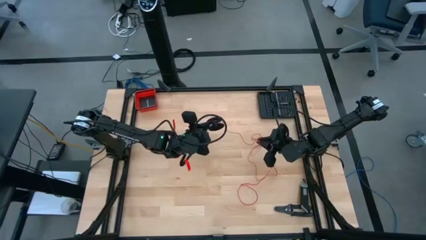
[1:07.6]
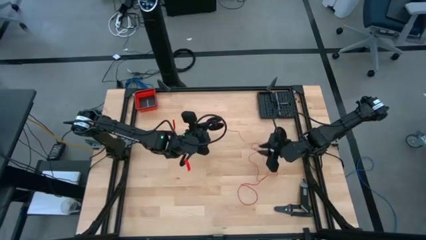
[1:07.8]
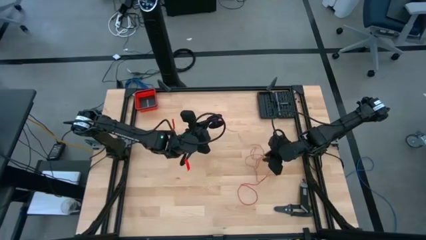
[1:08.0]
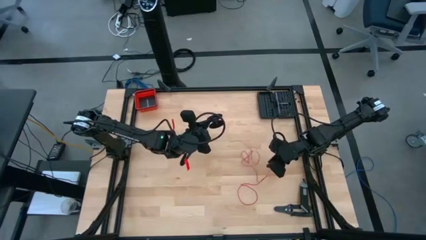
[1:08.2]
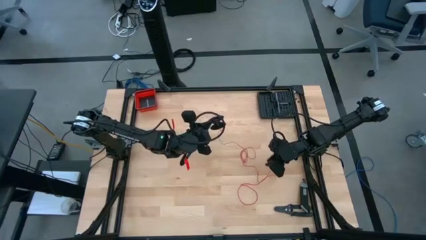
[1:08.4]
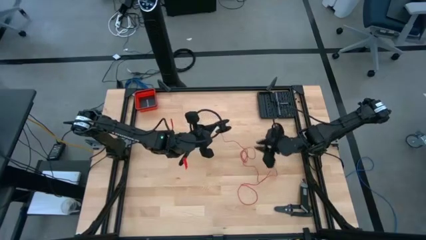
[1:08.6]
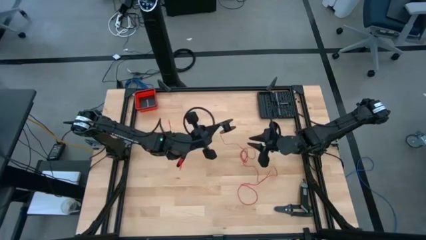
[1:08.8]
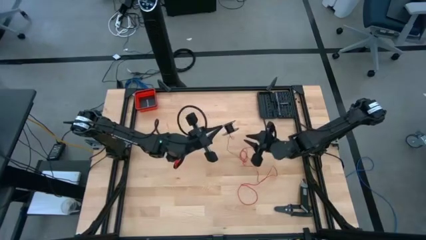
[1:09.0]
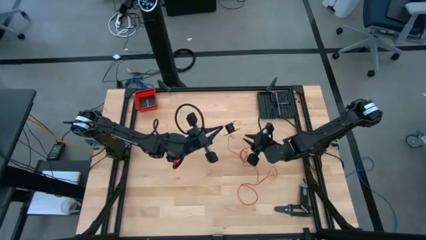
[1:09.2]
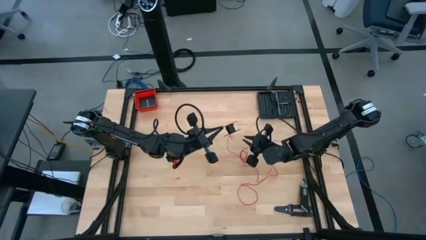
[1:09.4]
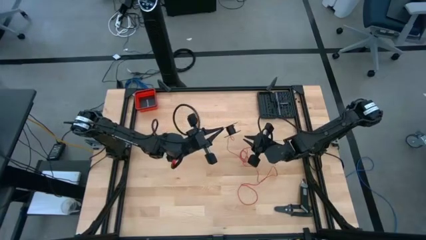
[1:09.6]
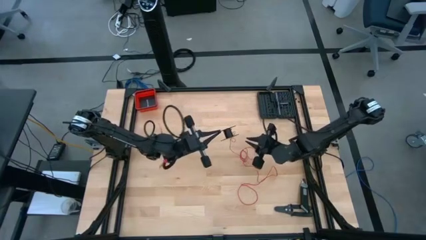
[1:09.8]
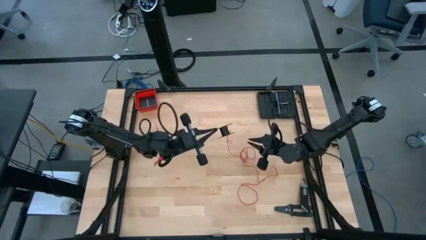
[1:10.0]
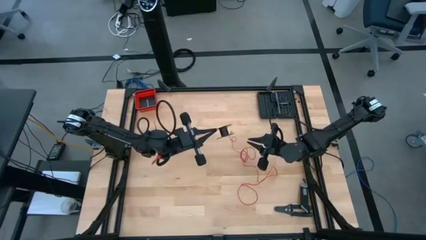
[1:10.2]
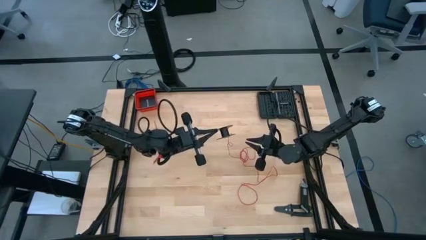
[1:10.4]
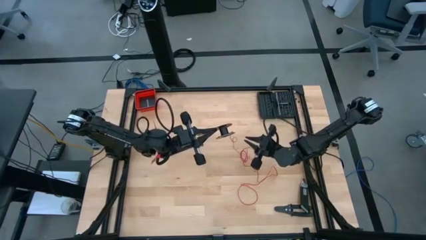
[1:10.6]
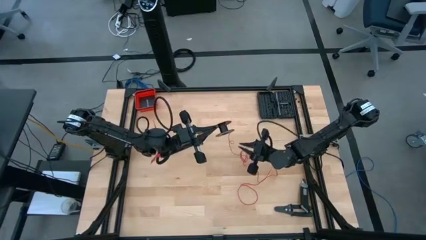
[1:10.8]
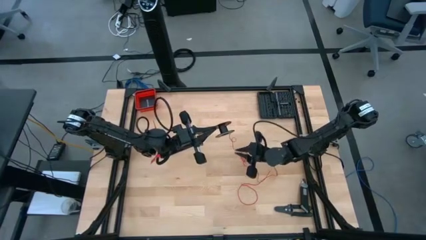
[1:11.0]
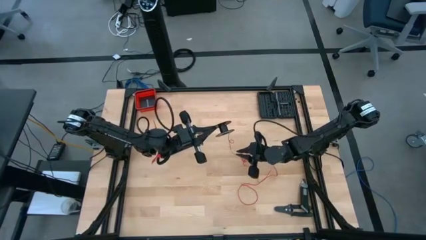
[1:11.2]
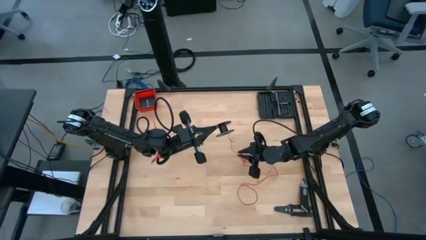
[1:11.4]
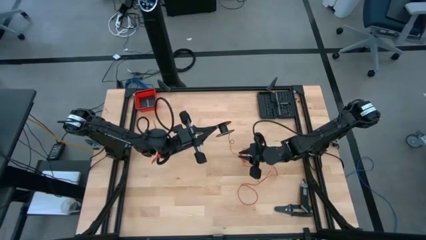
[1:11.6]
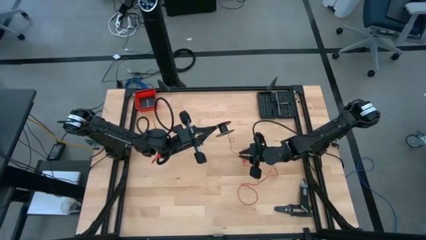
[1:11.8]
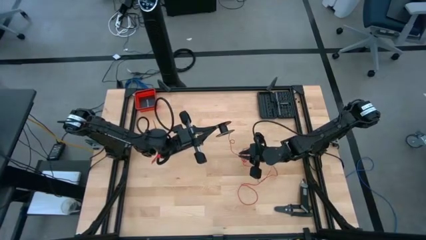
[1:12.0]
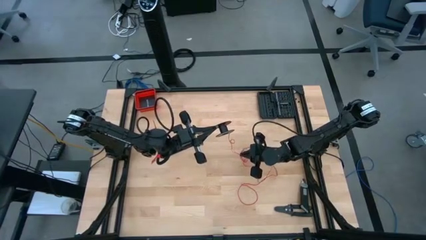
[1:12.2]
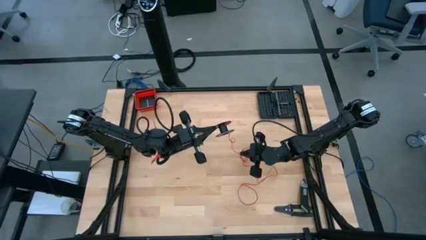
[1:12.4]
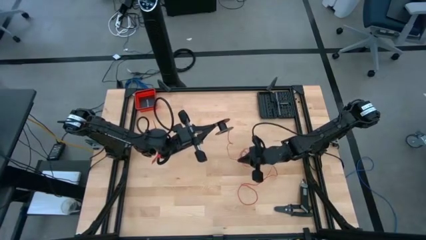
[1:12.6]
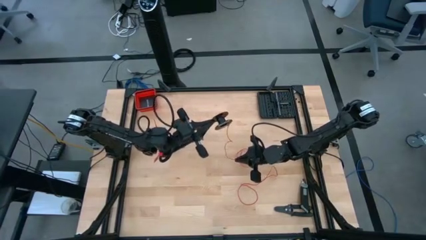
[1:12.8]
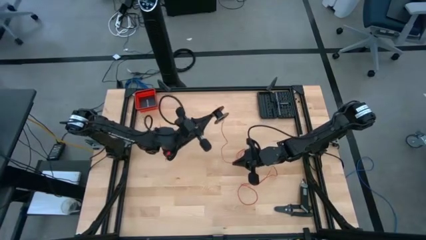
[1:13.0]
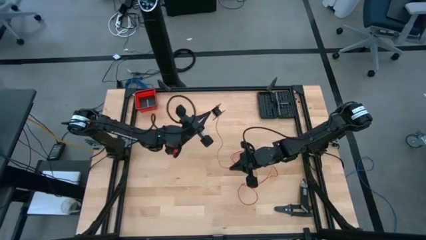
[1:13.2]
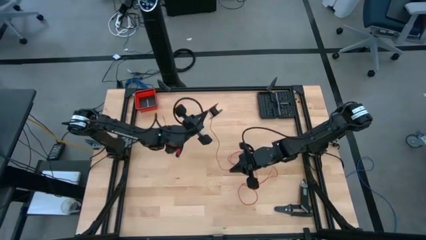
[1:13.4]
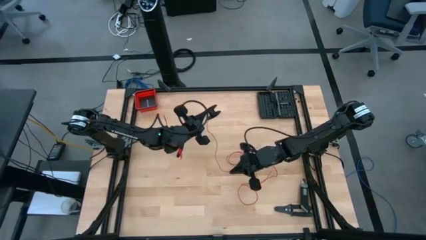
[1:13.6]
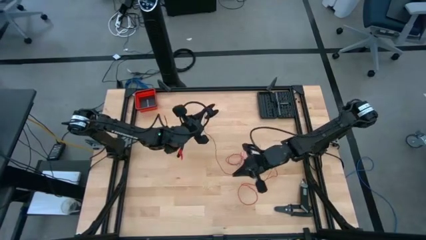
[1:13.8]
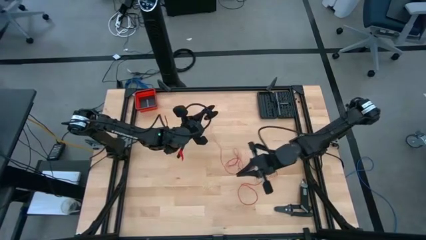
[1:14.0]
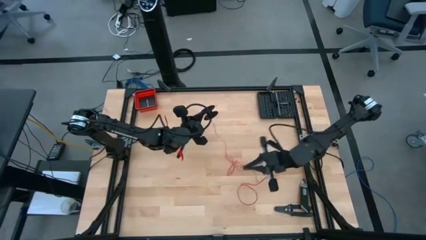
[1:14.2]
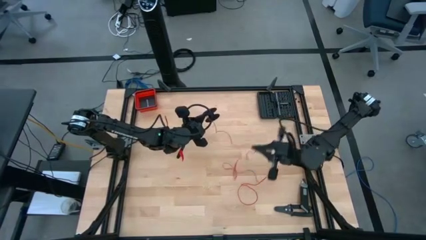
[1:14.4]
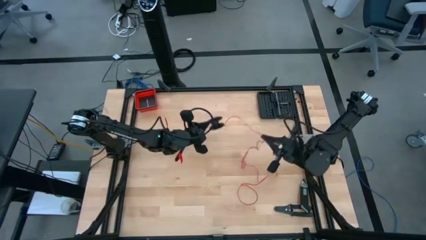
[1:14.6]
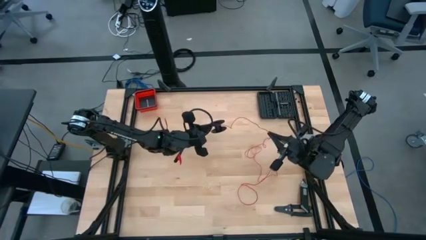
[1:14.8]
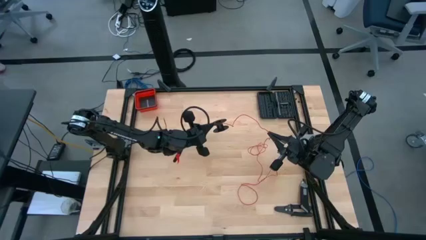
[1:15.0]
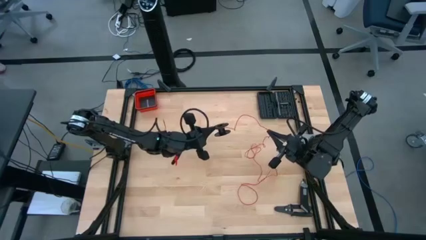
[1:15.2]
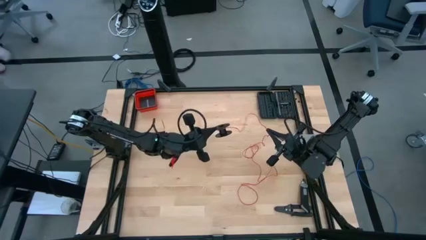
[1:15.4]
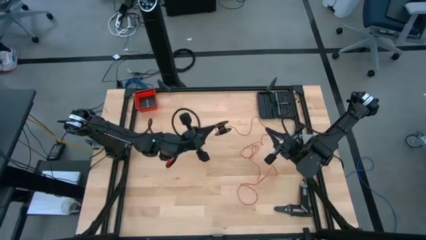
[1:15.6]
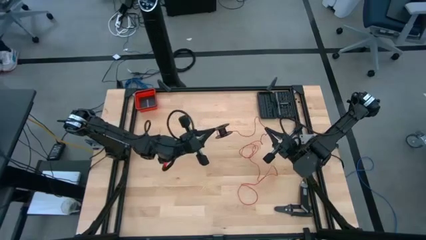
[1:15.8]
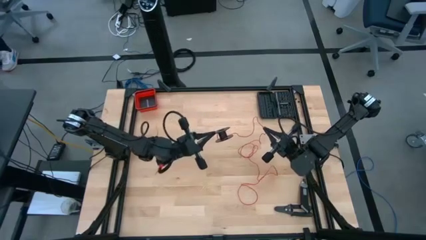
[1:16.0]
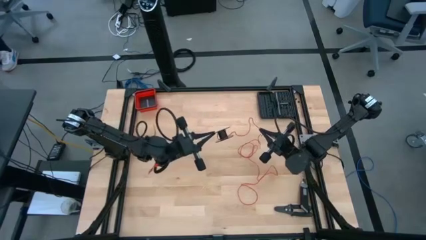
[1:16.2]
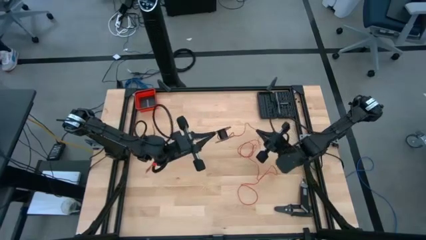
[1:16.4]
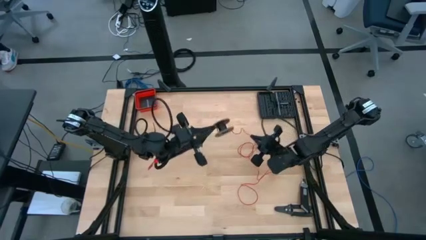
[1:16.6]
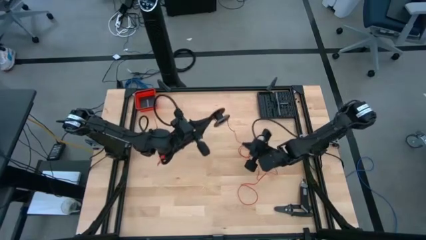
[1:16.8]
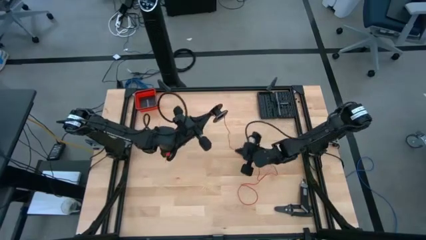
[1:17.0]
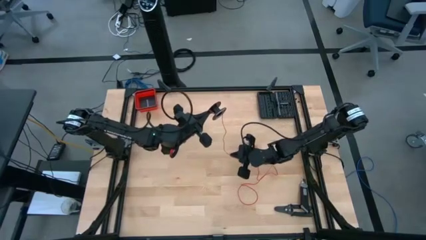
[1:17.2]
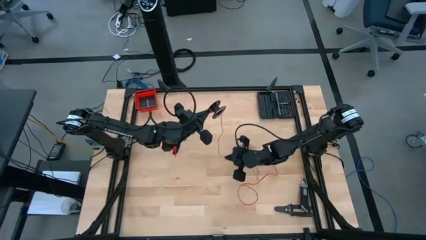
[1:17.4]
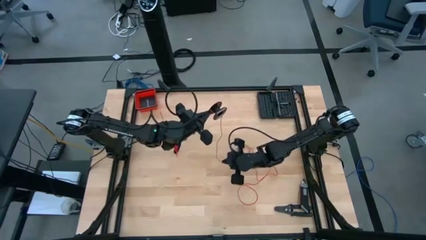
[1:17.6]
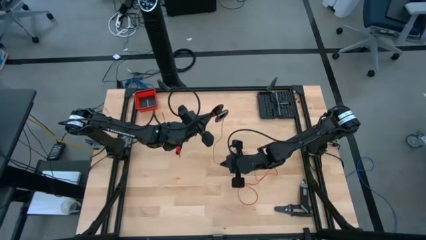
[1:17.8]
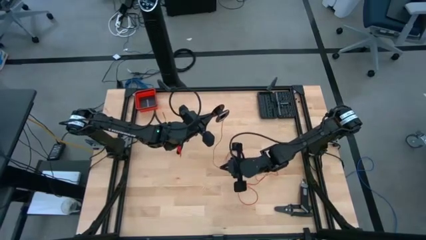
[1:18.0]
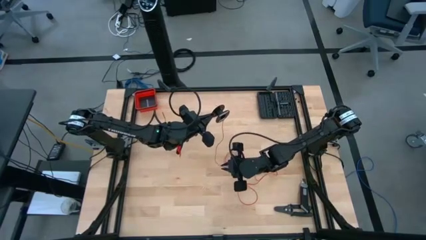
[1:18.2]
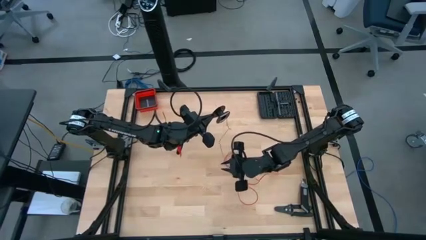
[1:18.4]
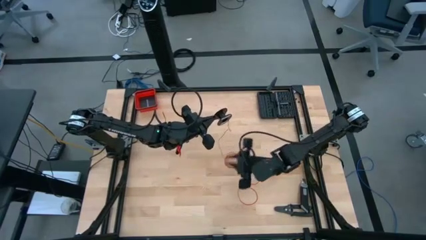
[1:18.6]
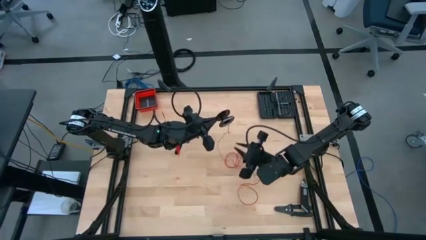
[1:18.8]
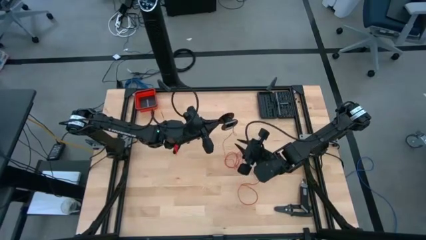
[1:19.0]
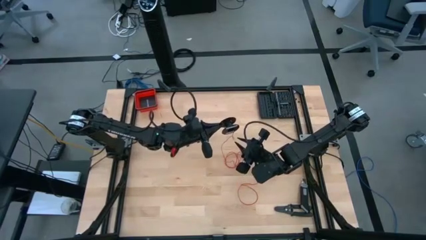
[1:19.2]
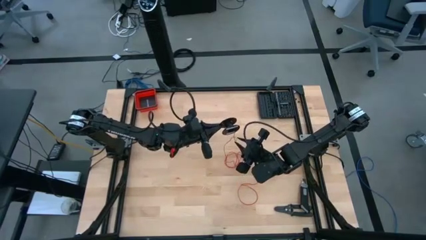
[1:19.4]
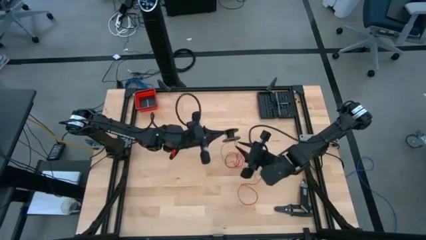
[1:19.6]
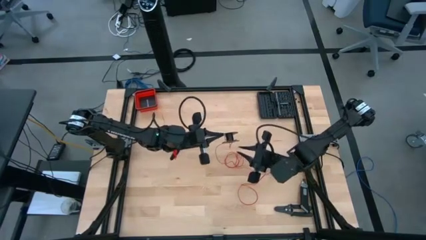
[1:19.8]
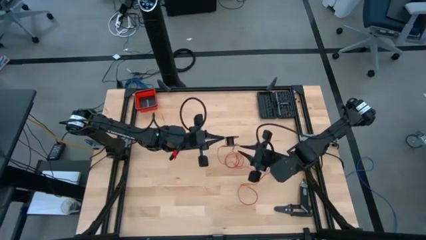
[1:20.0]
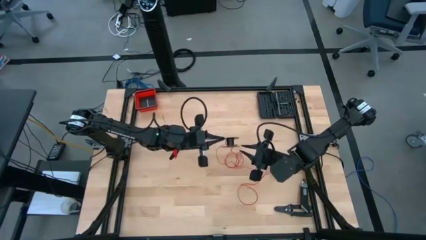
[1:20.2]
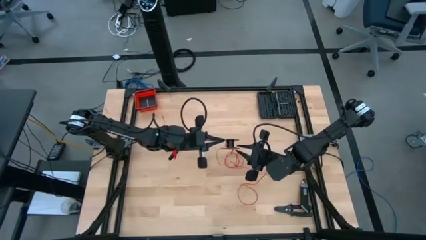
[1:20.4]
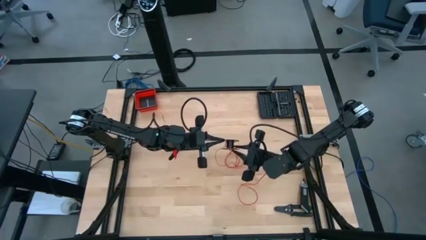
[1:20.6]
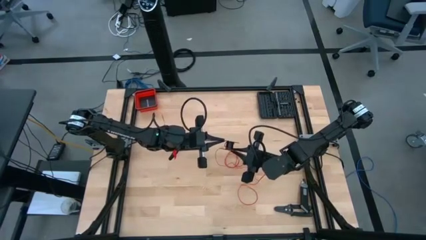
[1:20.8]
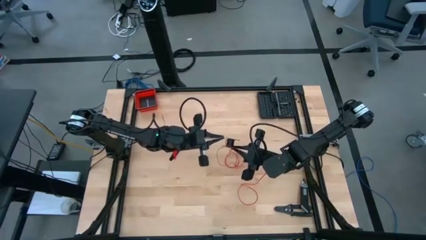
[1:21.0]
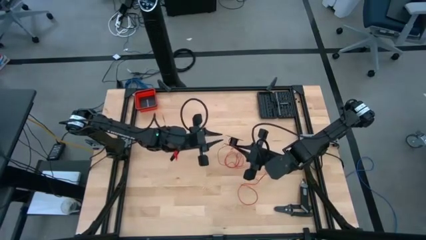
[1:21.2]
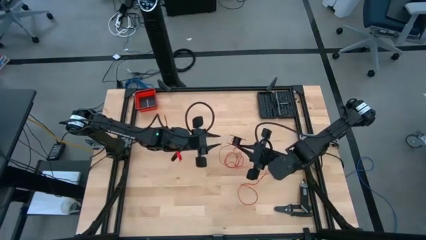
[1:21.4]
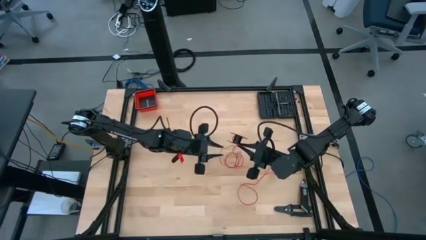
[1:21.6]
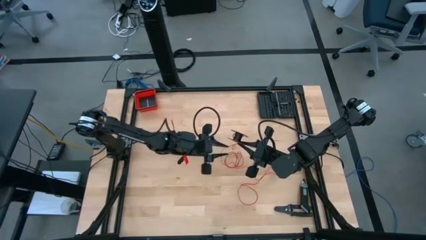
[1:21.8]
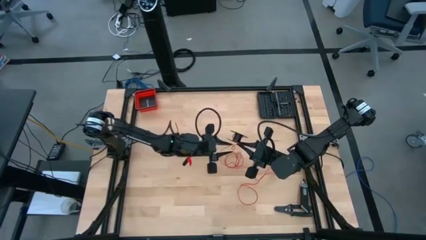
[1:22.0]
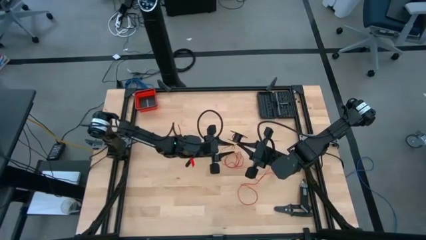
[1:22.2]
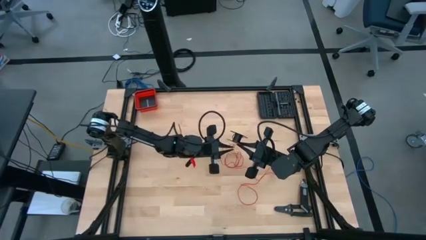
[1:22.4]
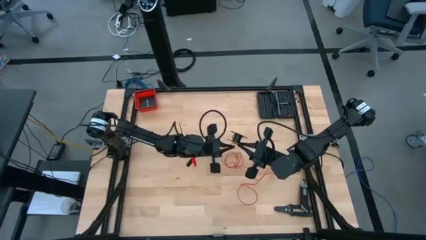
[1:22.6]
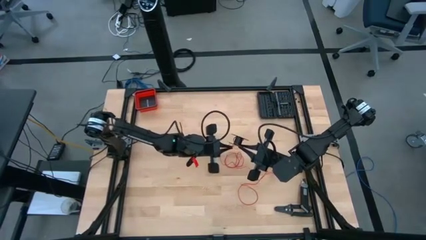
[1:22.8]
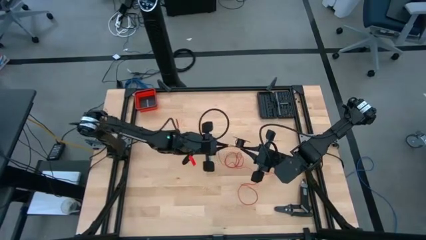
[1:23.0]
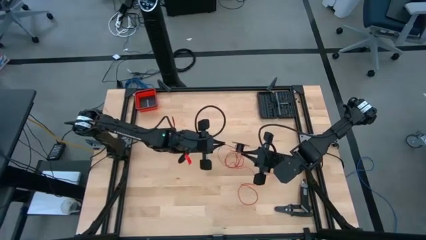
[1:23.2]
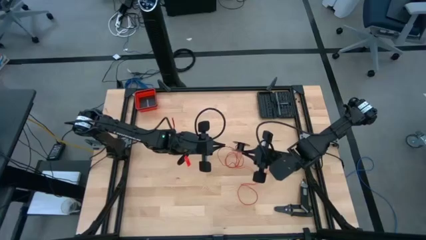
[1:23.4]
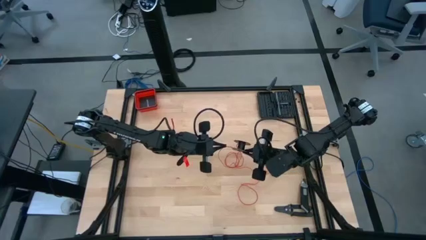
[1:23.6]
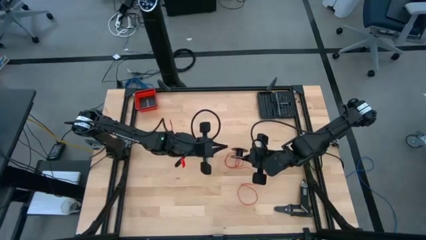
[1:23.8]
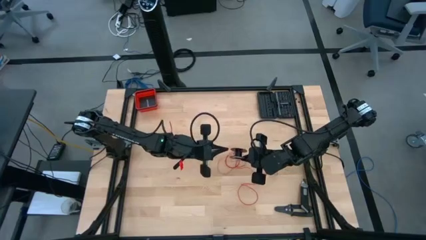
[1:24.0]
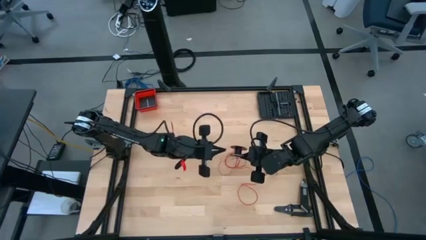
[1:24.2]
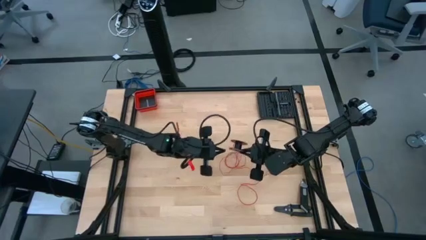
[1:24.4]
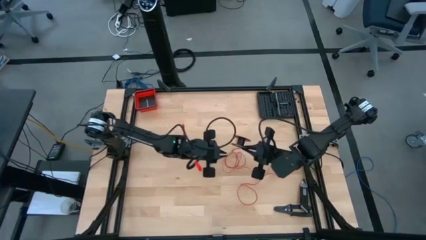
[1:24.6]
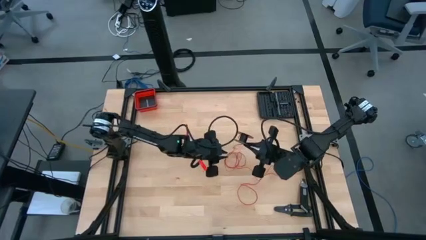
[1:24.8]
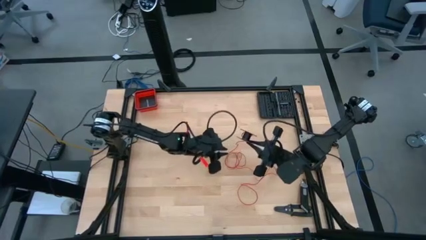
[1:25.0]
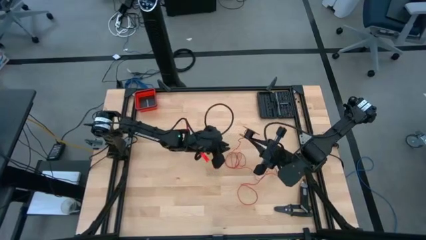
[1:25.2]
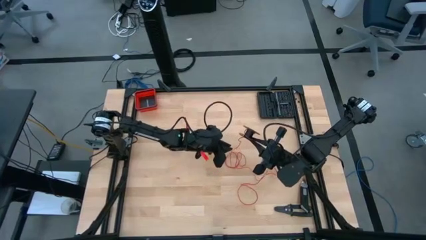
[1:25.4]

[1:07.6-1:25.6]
Task: Coil cords
Coil the red wire onto the spool
